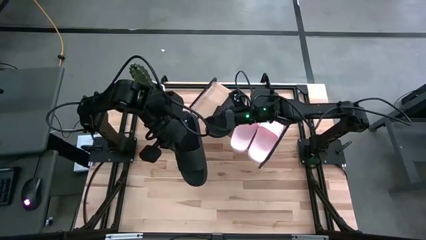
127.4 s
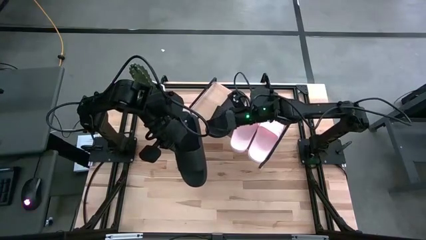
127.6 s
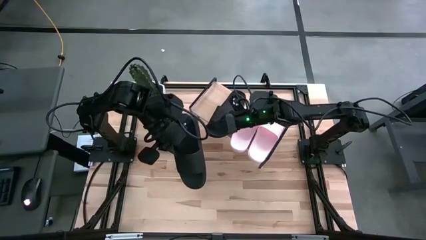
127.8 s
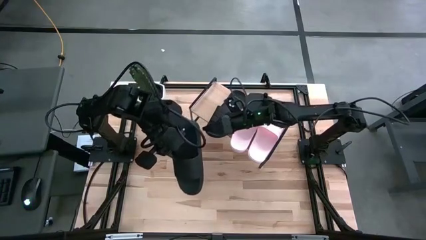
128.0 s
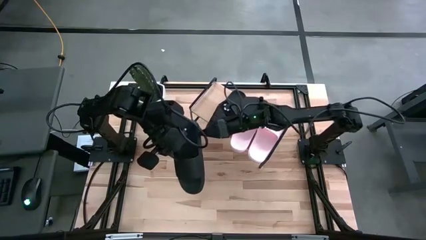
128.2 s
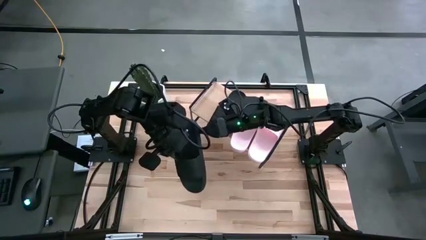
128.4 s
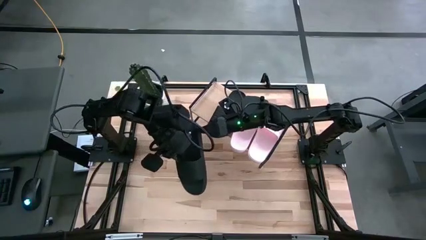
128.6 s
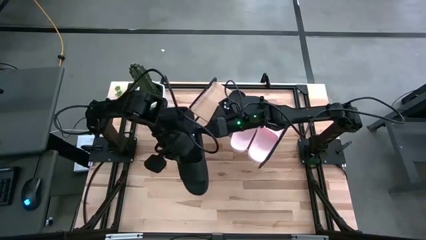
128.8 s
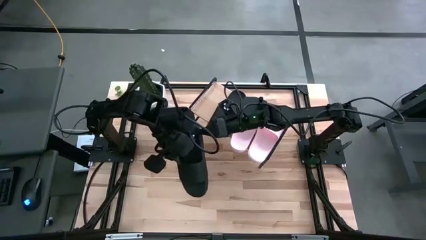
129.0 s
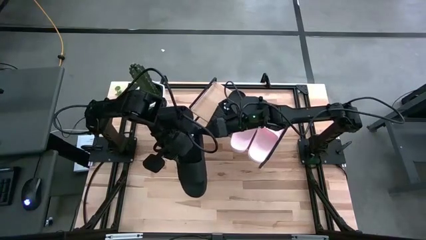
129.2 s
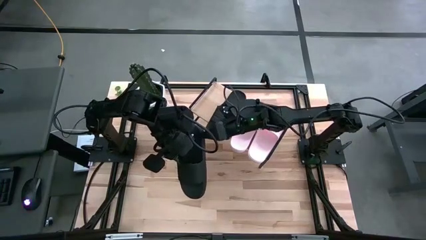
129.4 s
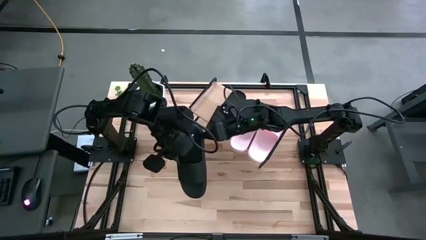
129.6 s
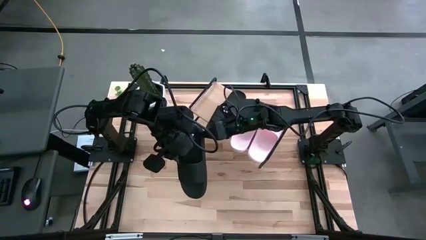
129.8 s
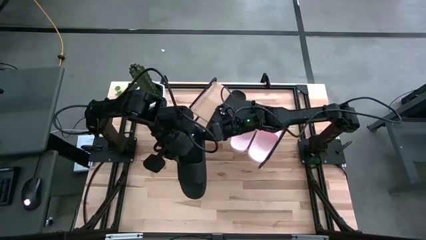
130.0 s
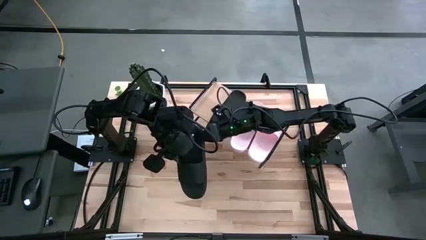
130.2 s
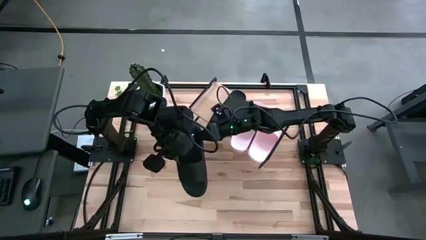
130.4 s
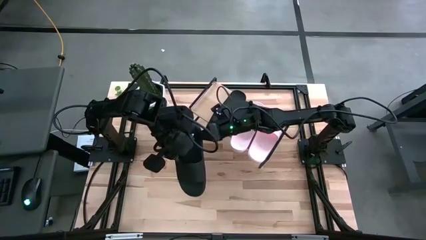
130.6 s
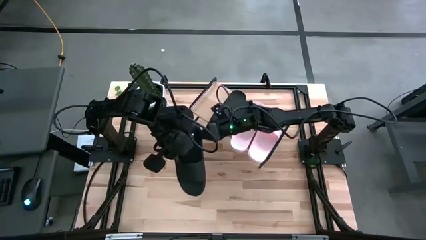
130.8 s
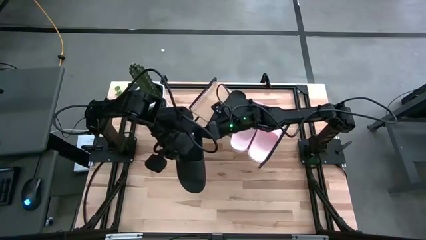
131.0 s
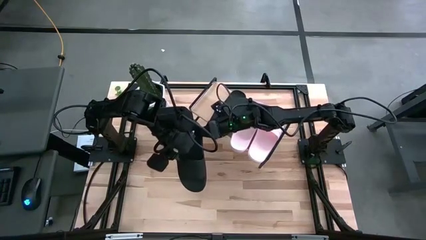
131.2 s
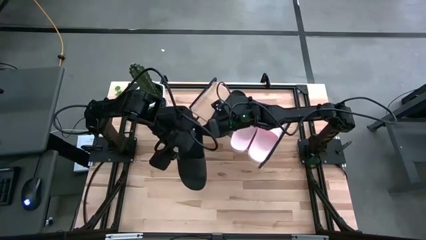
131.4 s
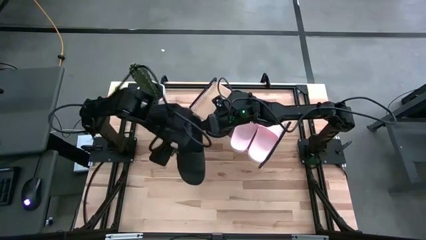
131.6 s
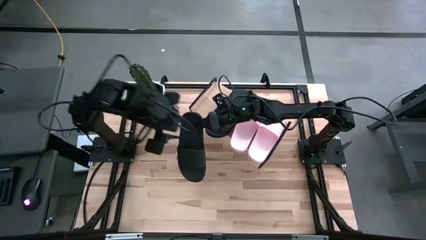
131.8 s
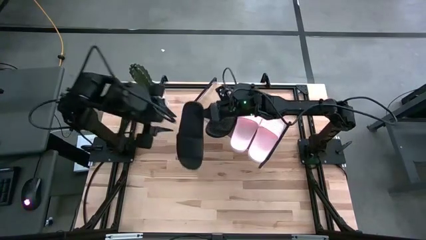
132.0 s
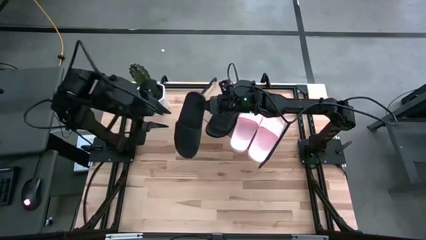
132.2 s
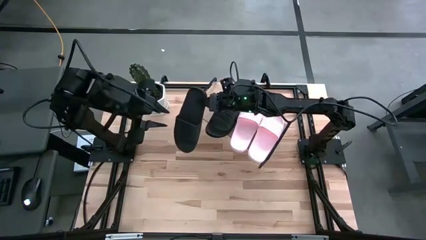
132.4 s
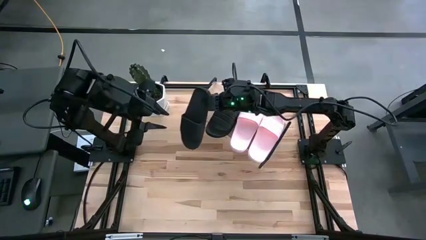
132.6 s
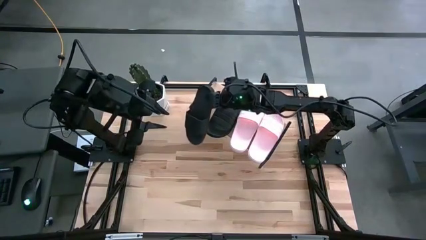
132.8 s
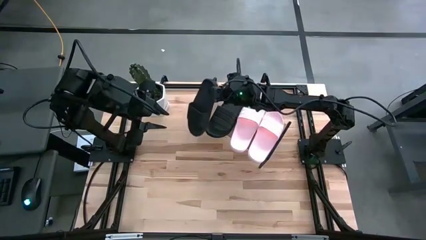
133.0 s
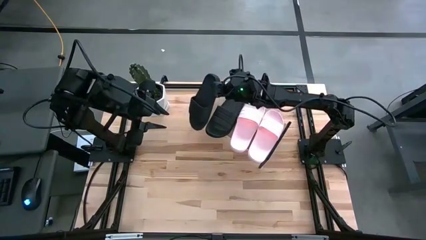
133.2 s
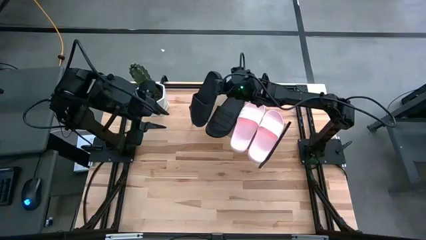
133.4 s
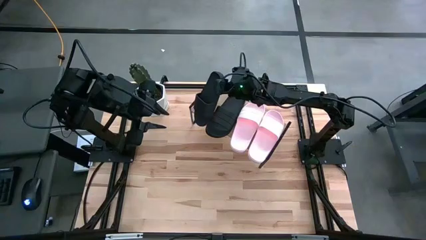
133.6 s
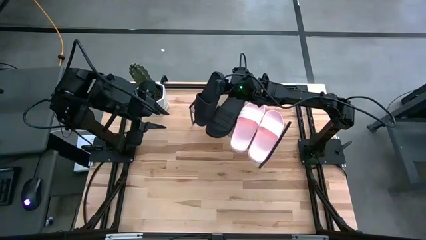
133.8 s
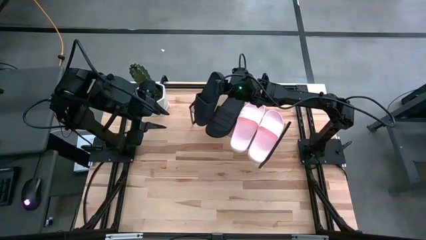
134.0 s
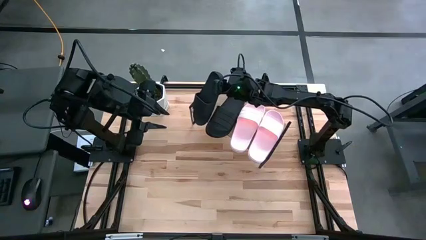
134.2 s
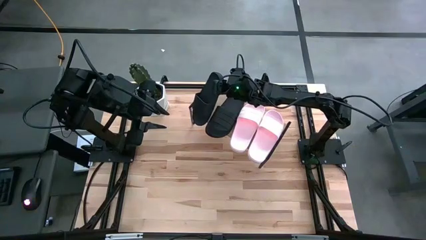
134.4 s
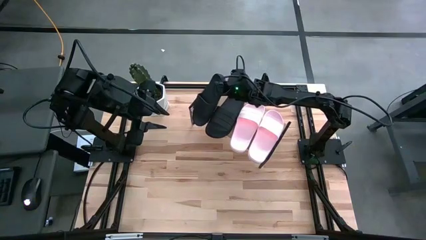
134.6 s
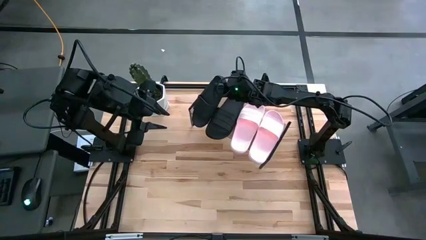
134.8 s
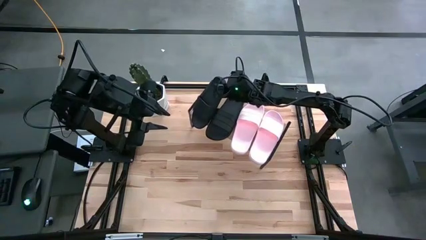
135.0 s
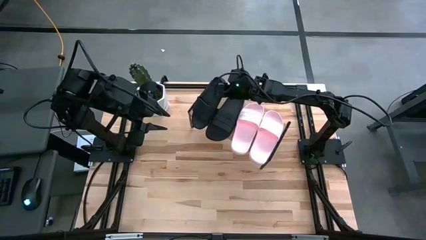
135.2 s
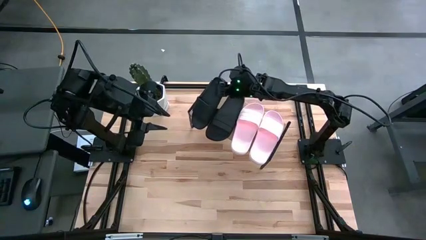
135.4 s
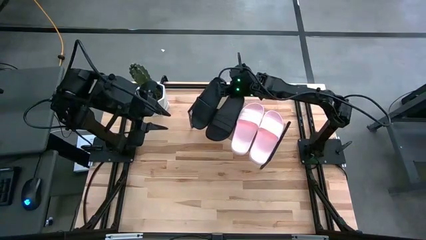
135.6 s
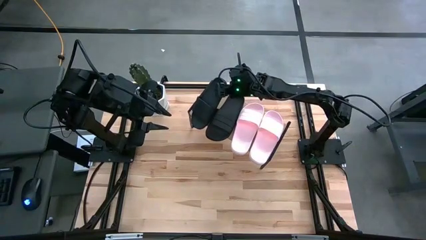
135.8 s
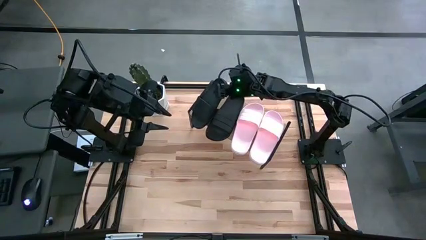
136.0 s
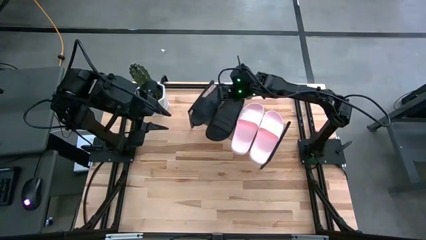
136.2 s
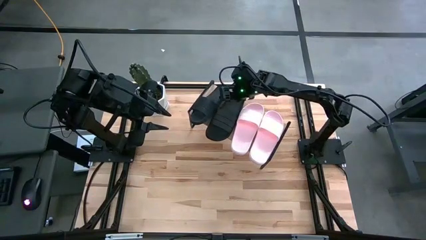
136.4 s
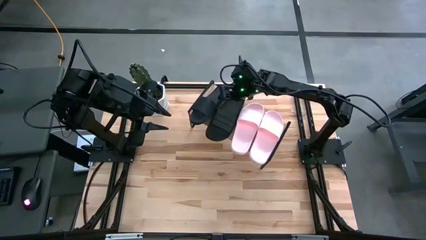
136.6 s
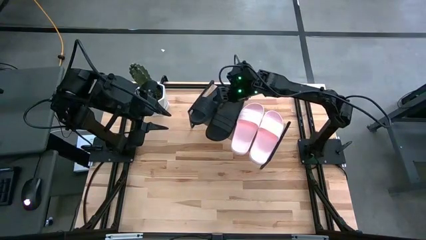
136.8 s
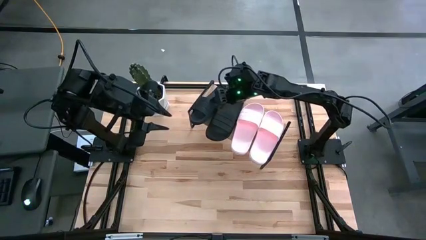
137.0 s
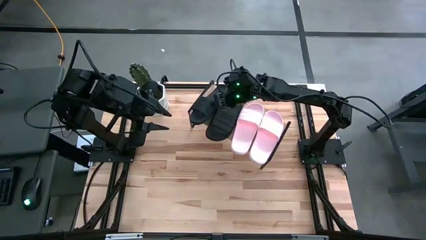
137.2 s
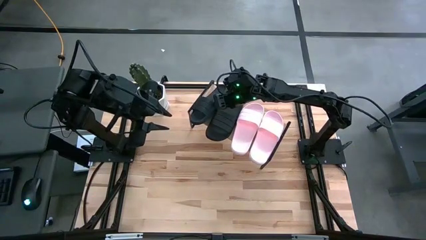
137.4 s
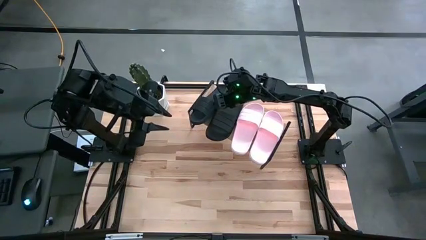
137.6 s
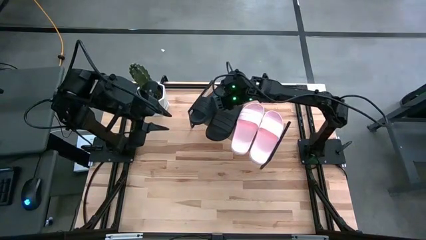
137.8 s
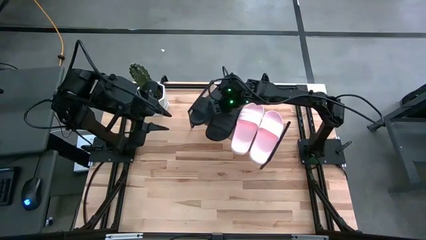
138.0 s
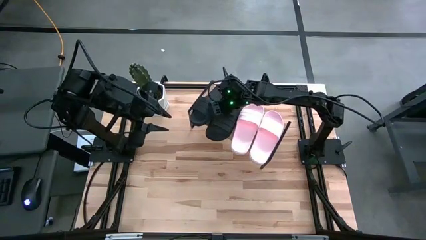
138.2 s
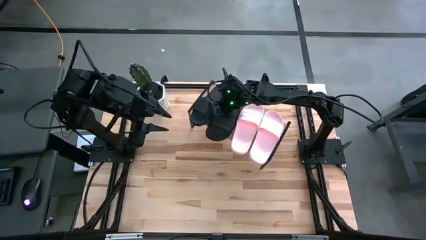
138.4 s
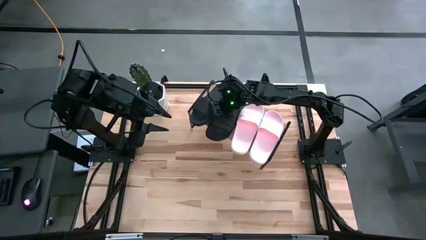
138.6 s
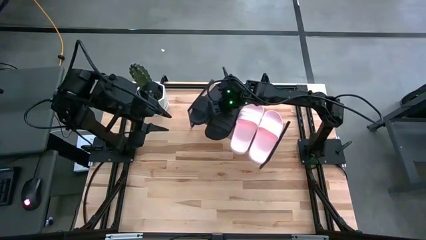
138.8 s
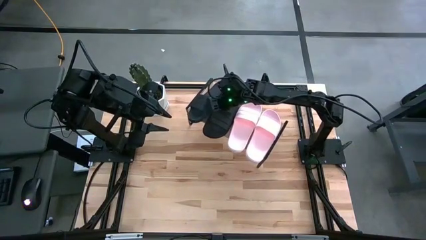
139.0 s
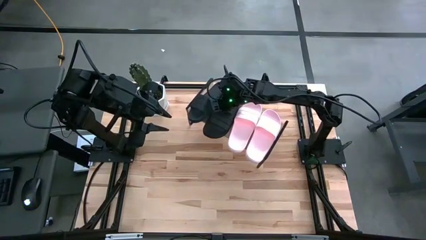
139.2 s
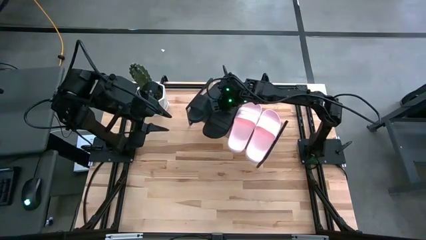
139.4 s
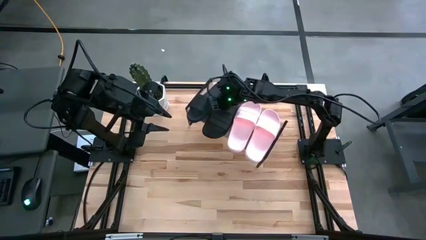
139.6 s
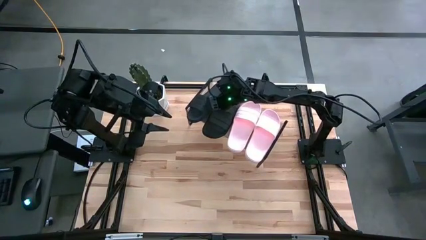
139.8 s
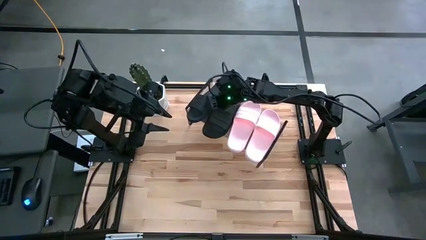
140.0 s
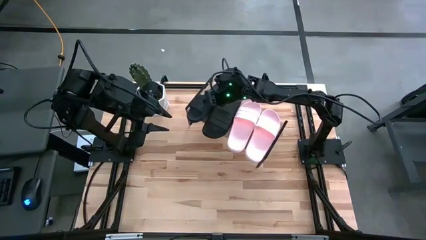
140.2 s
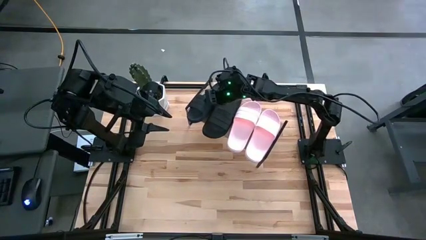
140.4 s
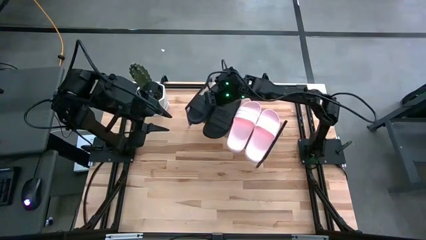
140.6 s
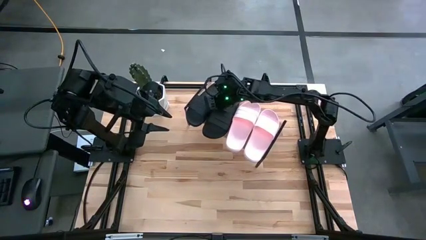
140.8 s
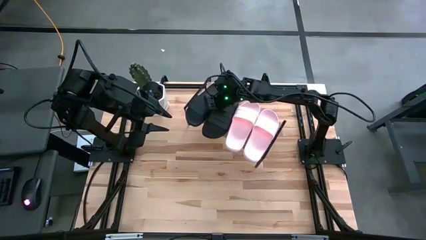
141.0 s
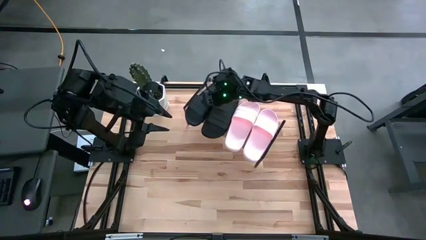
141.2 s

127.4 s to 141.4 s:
Task: Pick and place slides into the shelf
Put the black slipper on the shelf
